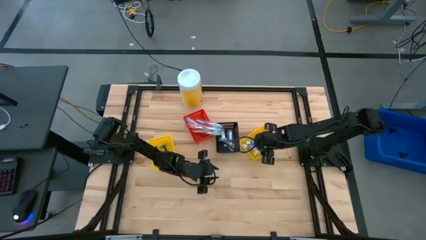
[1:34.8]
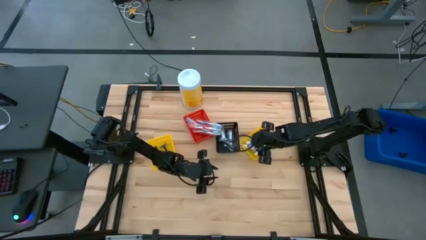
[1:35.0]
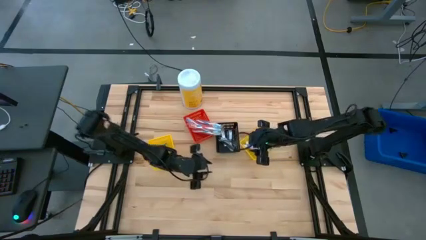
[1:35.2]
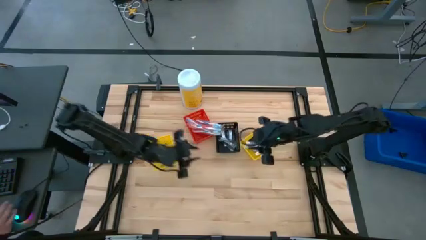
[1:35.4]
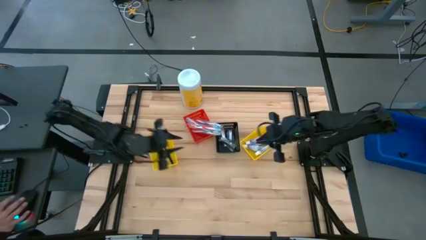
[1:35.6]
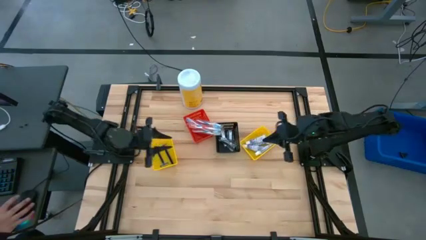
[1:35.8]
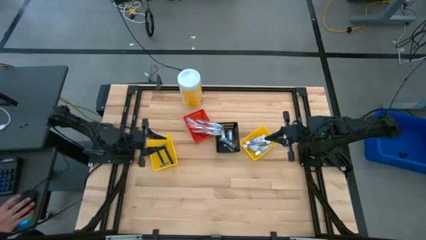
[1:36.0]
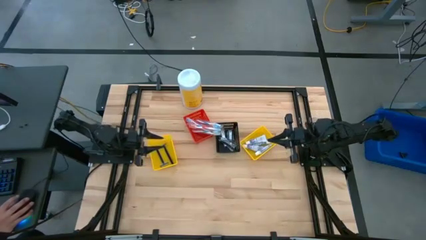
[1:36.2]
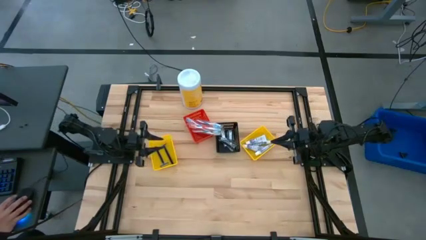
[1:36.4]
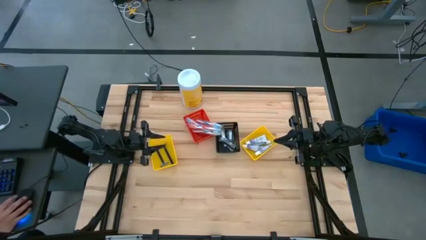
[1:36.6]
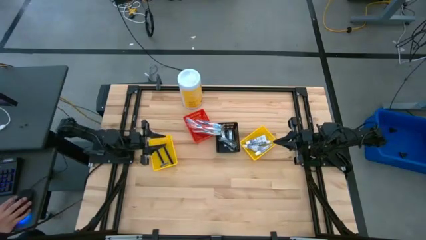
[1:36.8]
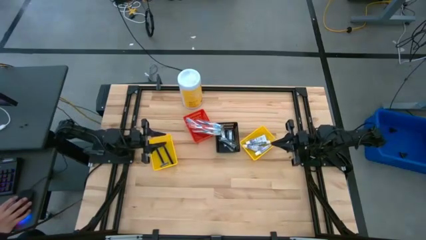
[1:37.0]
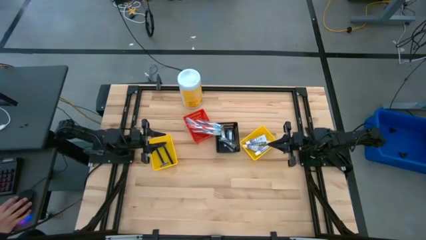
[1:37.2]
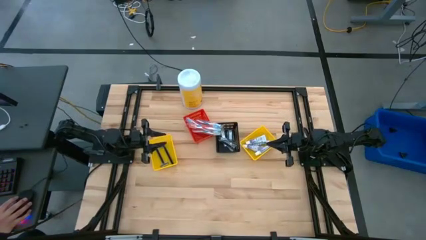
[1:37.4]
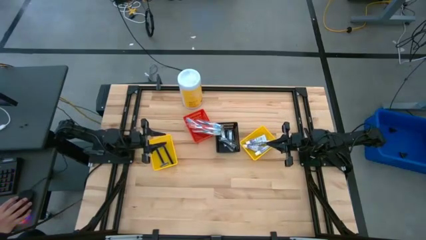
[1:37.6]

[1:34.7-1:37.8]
Task: Pick & Place Travel size toiletries
Return to Home Position

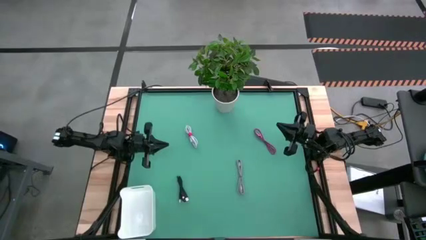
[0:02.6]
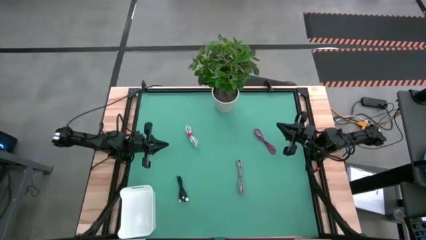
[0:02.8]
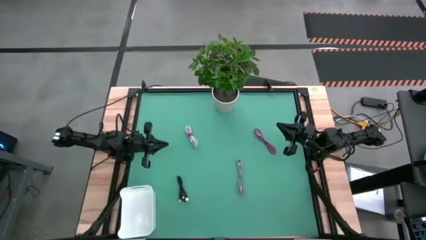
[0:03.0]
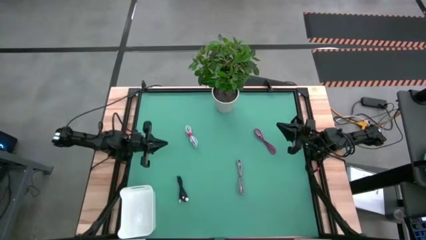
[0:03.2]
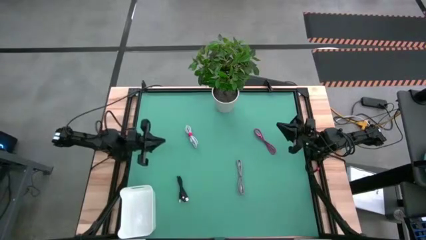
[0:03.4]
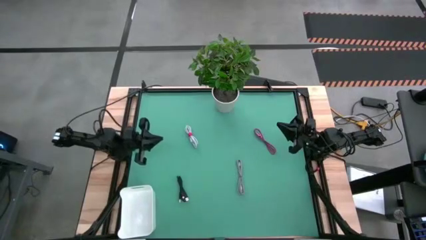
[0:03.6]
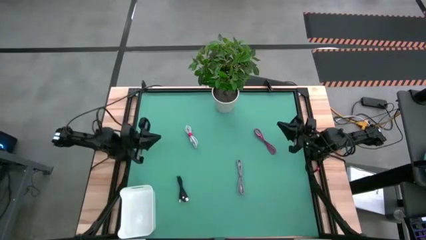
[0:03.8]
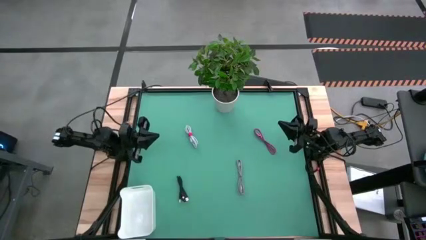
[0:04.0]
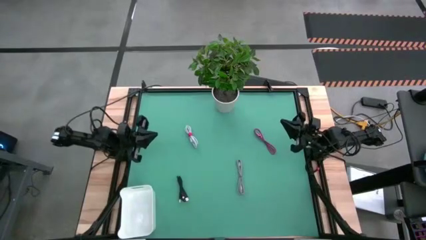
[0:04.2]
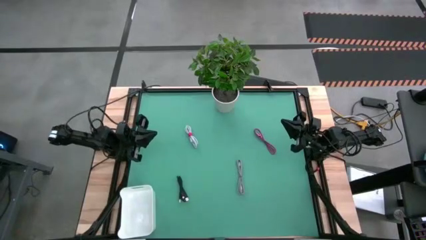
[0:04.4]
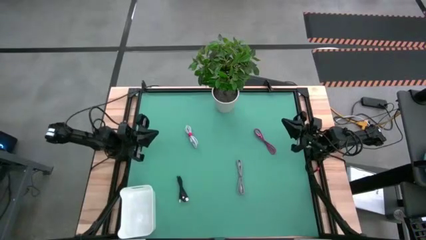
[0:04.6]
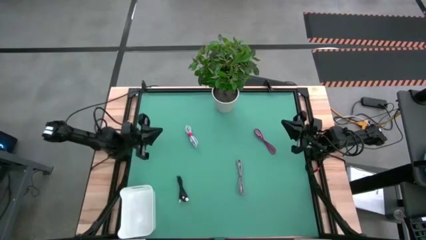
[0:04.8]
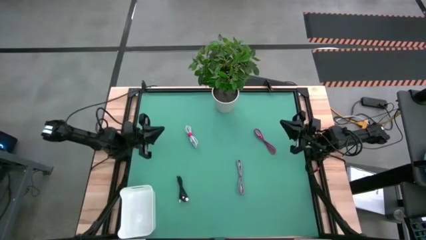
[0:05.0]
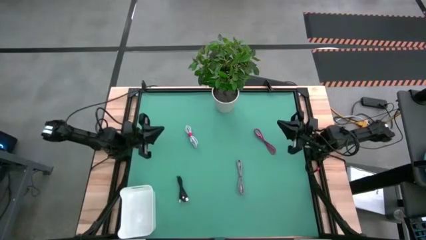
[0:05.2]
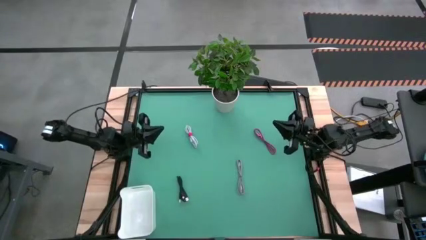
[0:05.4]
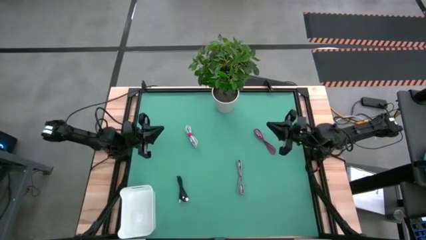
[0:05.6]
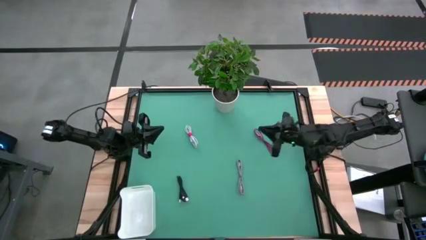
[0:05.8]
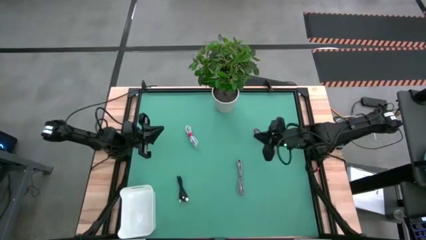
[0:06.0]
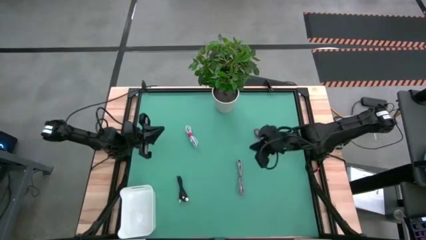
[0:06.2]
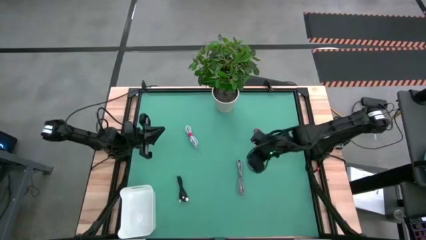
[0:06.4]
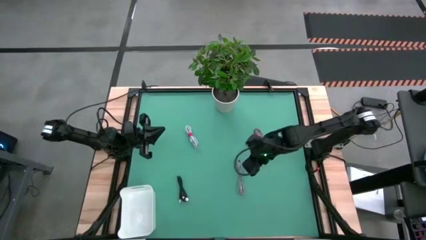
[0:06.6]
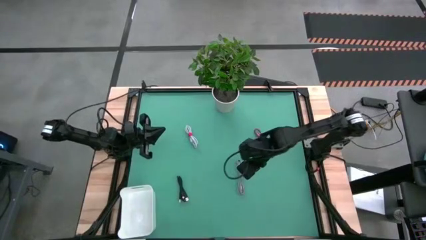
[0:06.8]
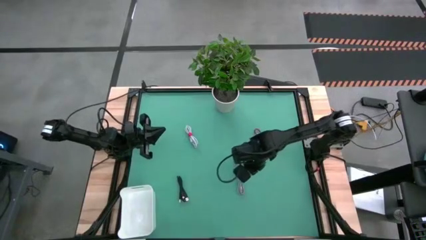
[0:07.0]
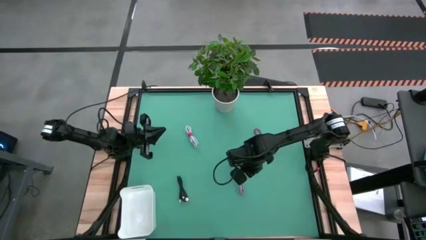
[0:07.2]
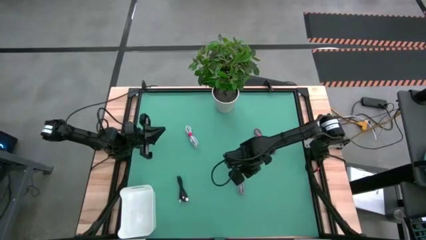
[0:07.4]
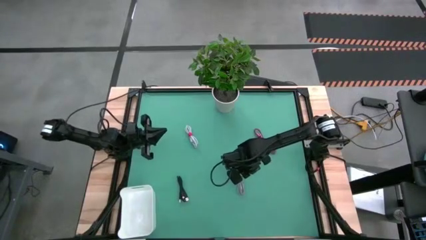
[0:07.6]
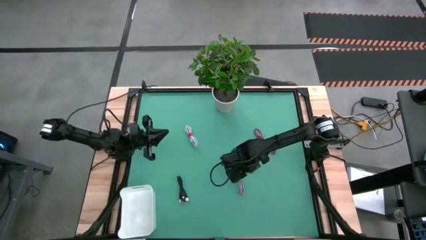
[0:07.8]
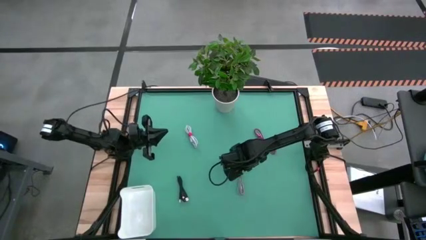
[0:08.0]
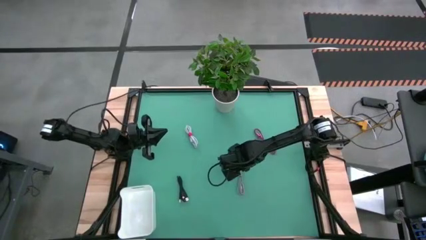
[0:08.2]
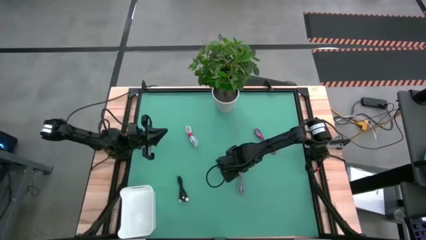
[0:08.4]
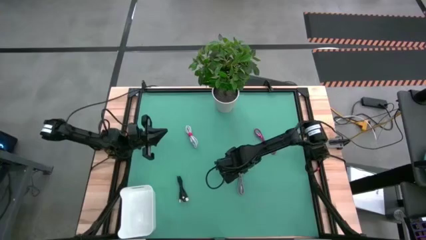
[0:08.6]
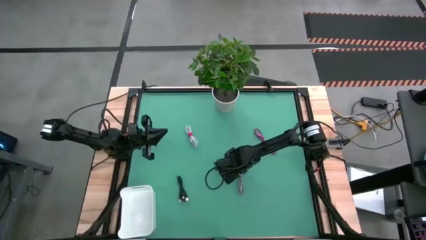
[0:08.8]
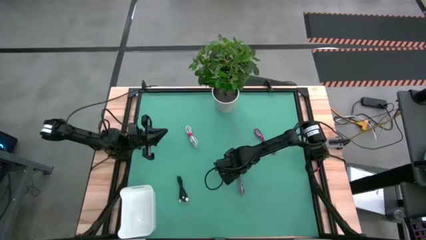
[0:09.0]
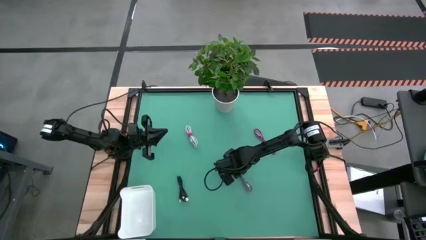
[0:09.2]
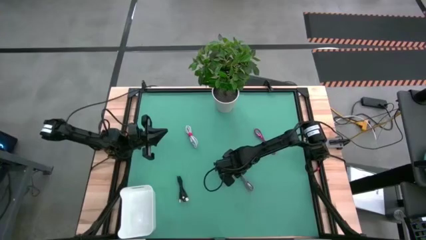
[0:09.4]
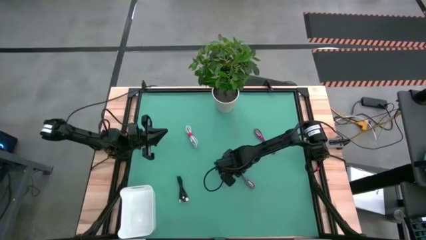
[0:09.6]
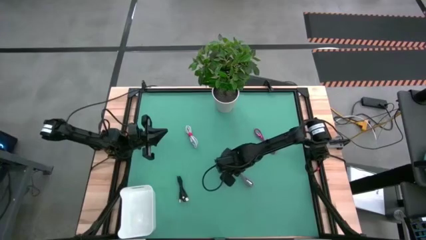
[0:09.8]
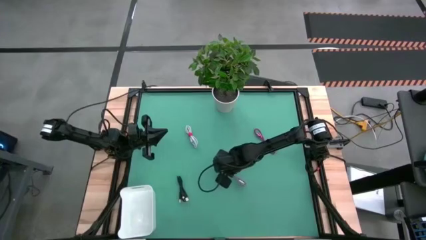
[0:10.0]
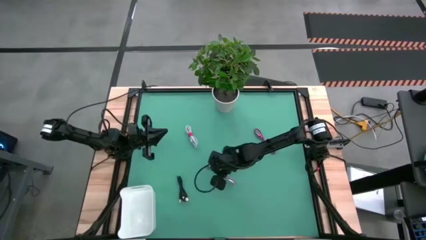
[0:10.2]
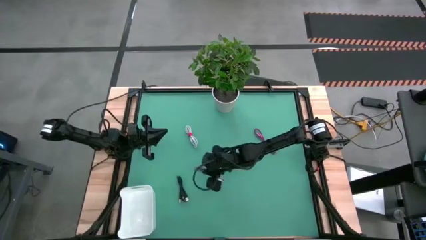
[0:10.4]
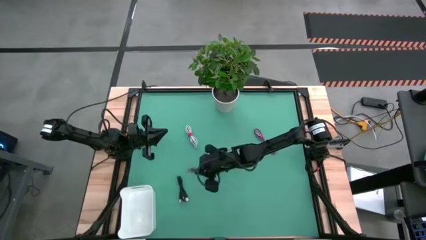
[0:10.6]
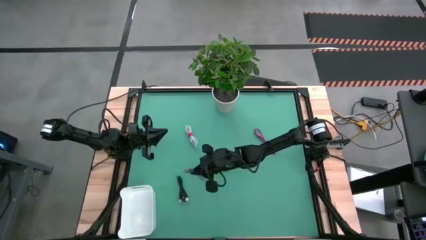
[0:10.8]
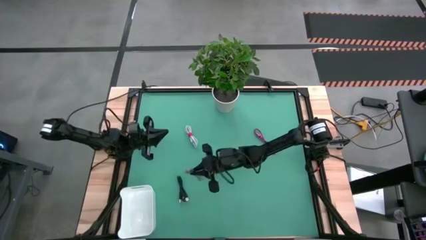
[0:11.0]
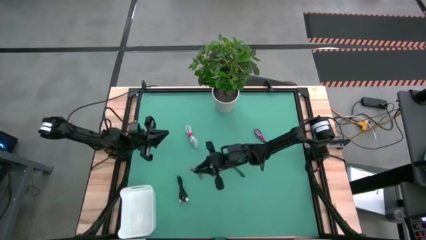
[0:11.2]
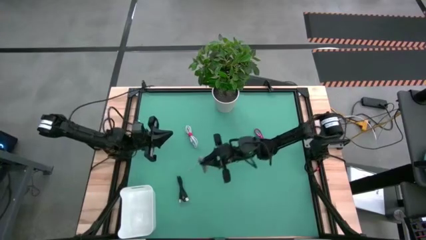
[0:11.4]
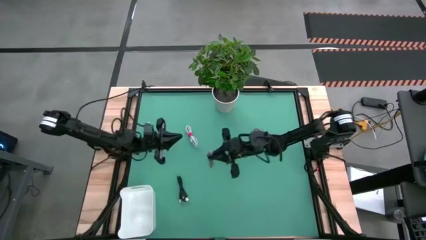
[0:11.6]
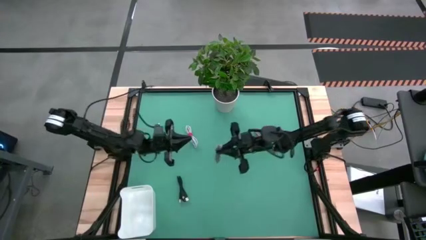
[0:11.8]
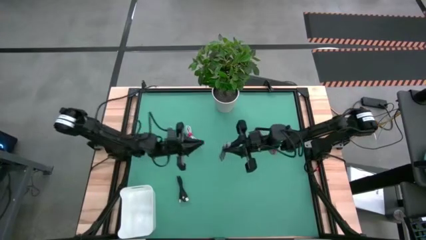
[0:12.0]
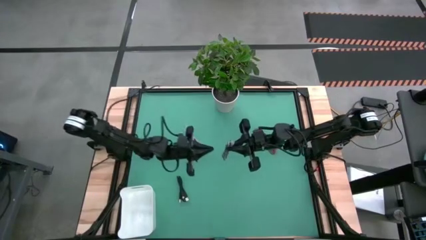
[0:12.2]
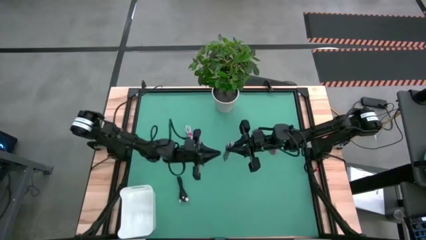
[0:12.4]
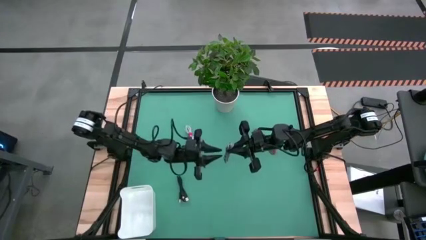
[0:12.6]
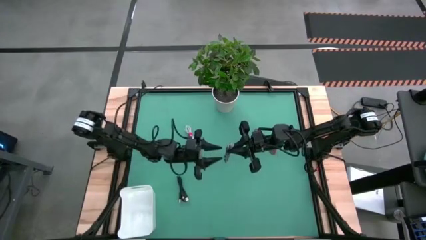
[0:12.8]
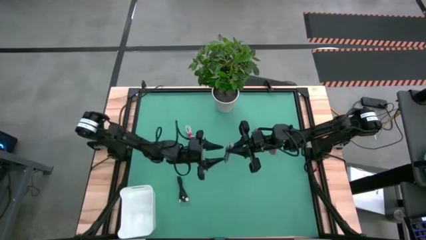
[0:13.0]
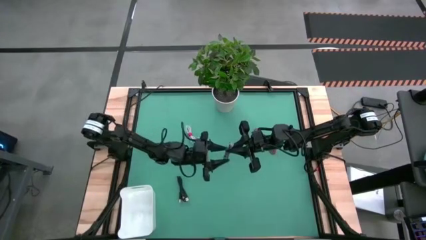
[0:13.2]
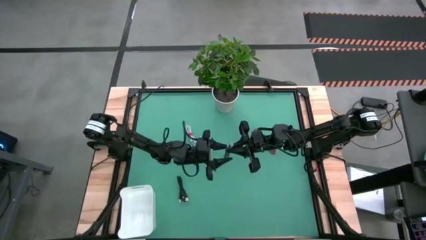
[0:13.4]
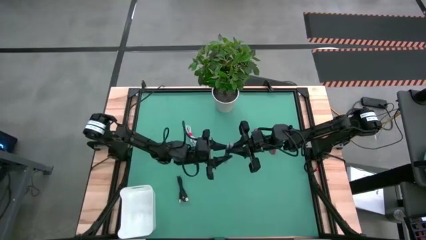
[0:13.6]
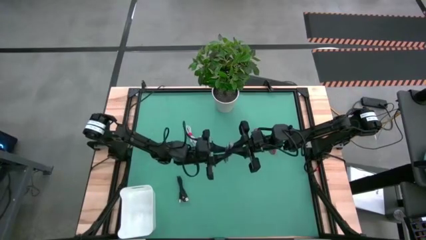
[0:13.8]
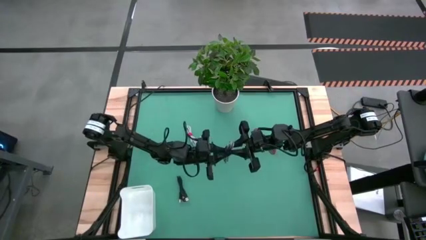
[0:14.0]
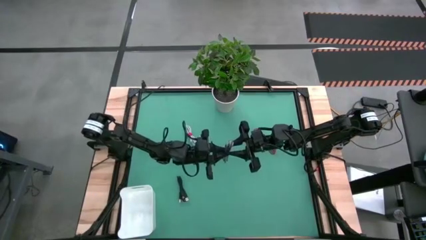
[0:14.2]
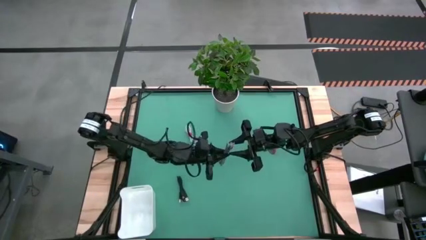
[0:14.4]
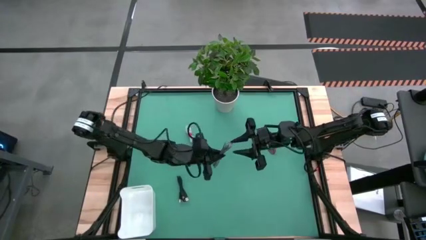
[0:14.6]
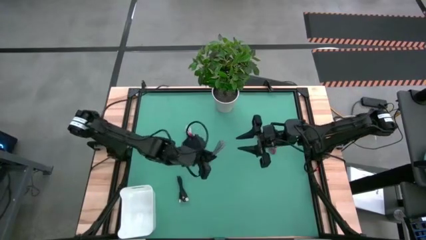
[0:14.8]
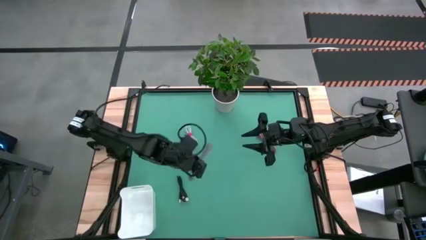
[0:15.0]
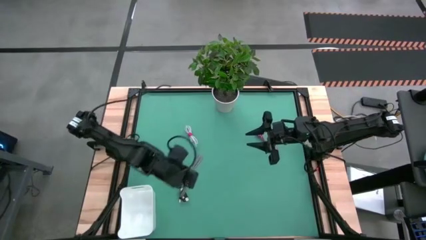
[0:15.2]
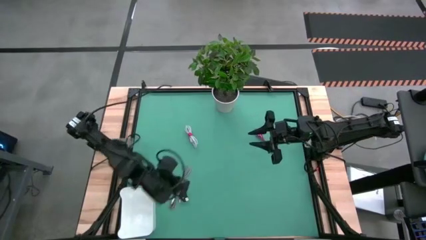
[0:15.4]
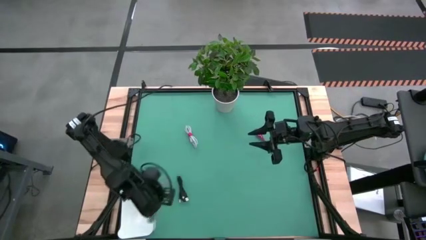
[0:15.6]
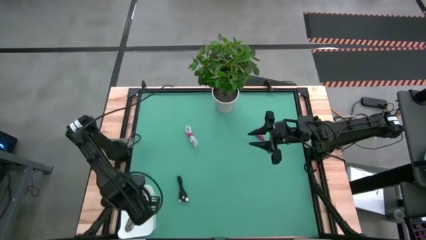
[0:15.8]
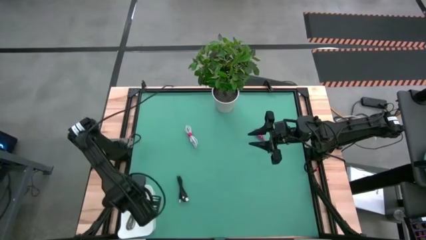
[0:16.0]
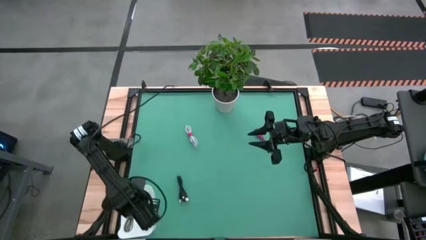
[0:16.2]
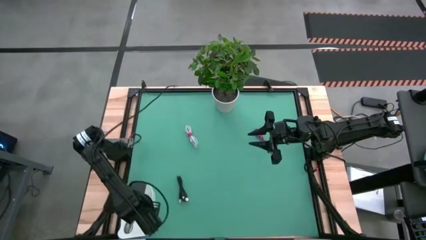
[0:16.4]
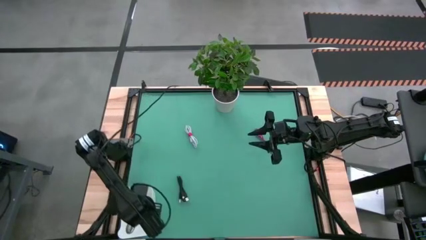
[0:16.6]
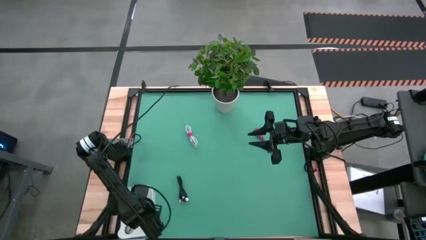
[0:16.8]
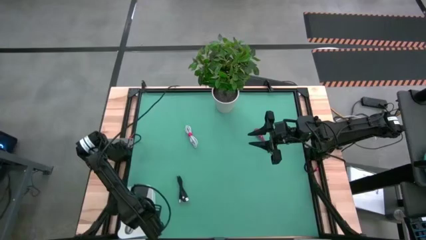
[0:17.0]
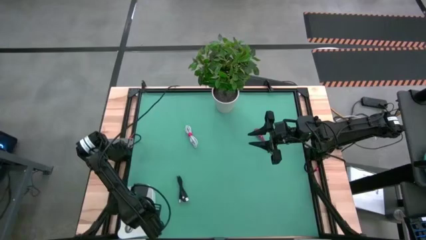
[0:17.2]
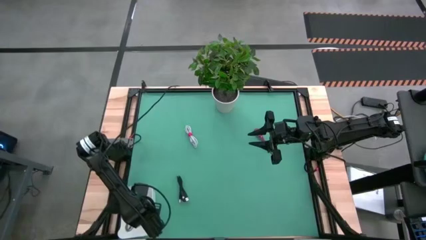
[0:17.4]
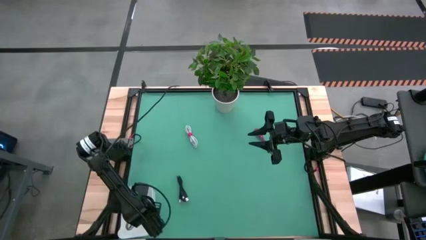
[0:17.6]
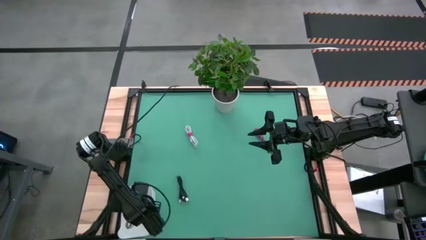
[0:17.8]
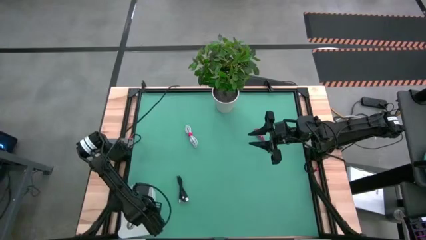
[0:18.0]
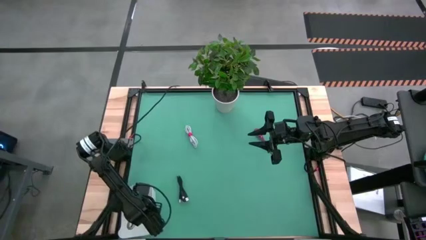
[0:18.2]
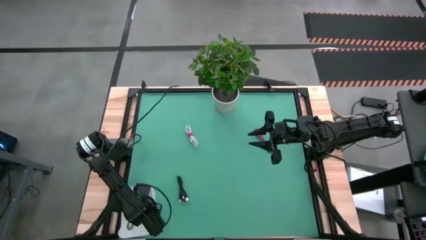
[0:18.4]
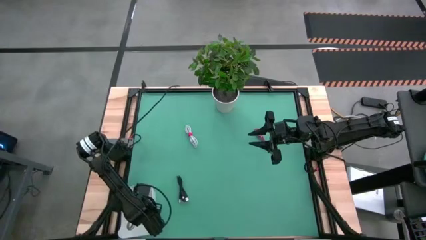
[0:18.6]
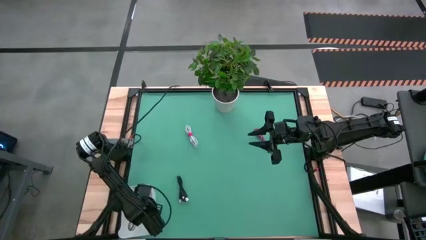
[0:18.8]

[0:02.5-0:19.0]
Task: Pick and place USB-C Cables
Put the black white charger cable into the bin
